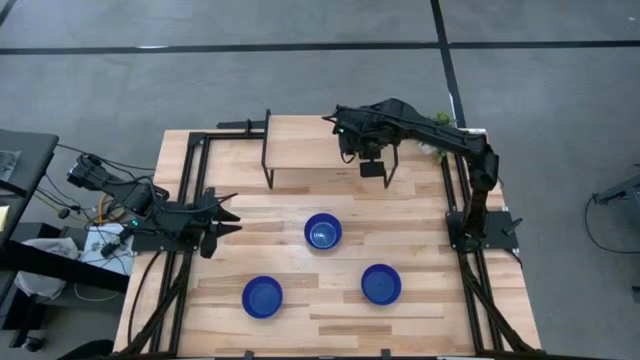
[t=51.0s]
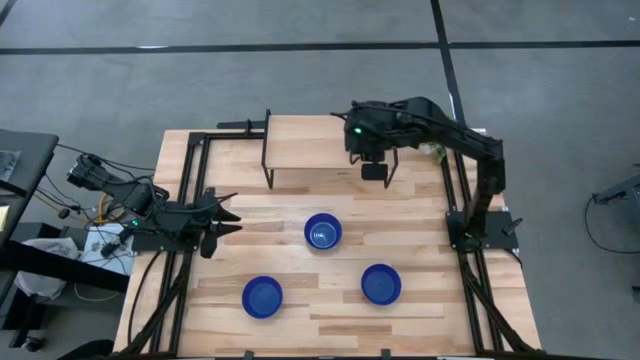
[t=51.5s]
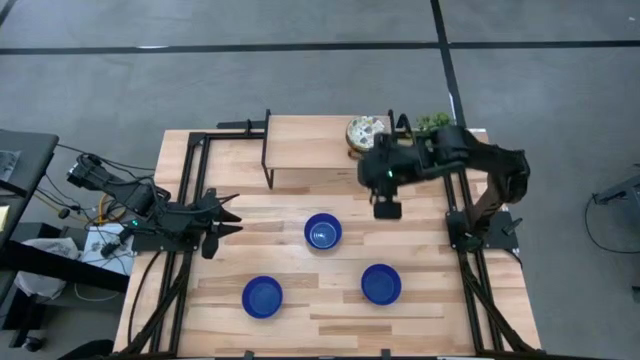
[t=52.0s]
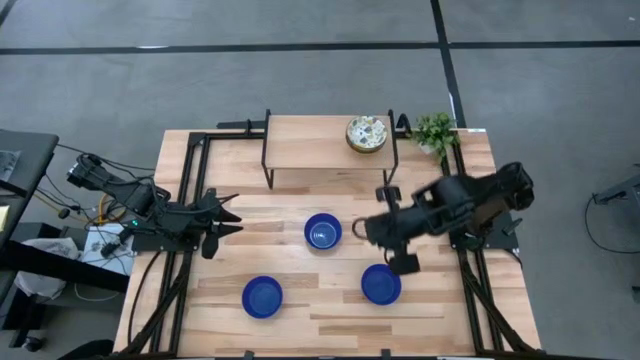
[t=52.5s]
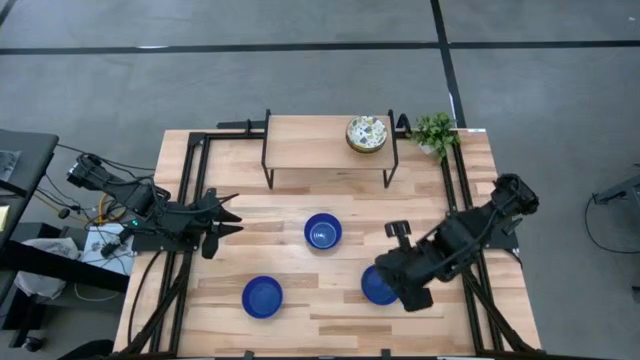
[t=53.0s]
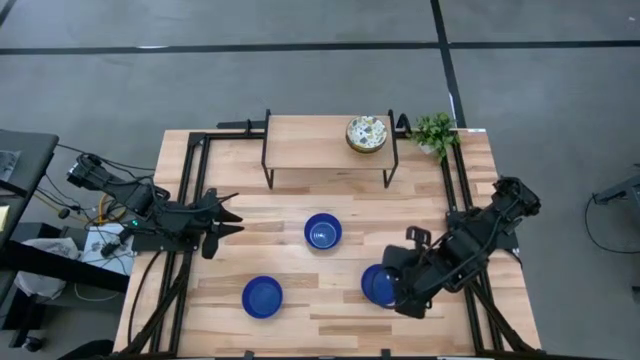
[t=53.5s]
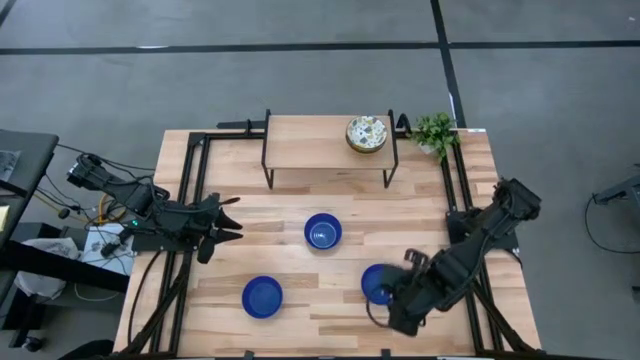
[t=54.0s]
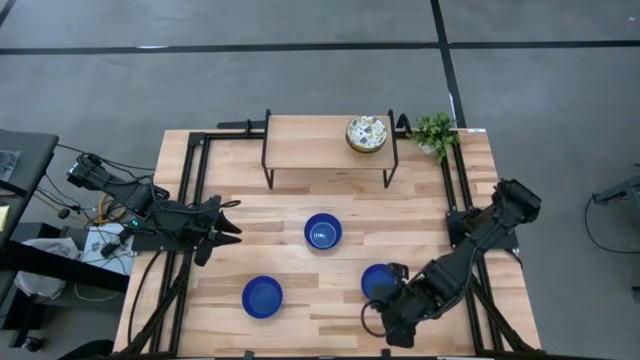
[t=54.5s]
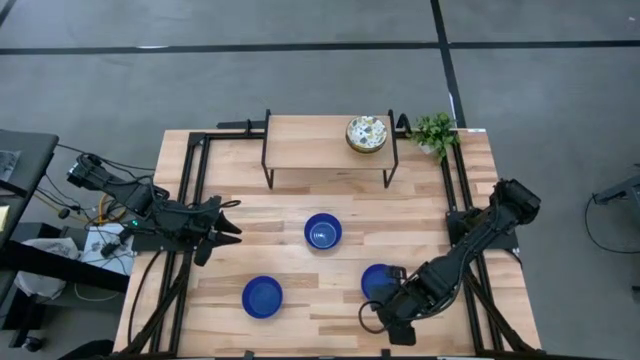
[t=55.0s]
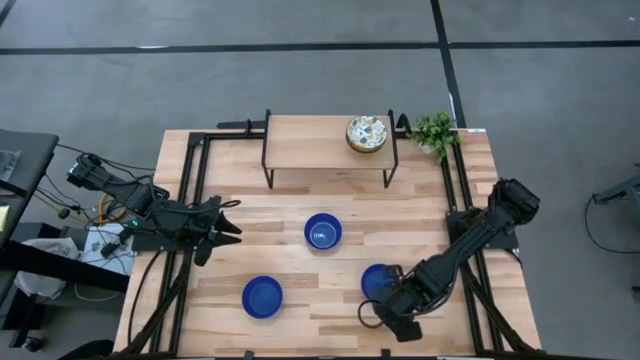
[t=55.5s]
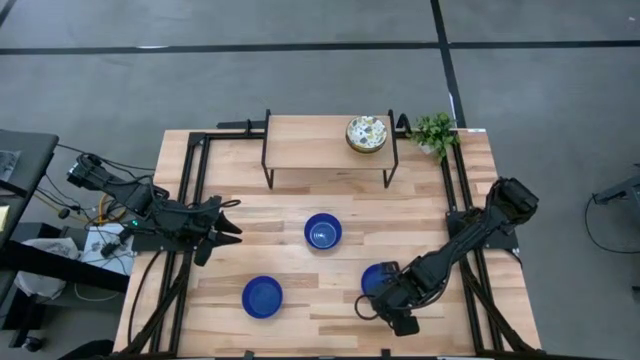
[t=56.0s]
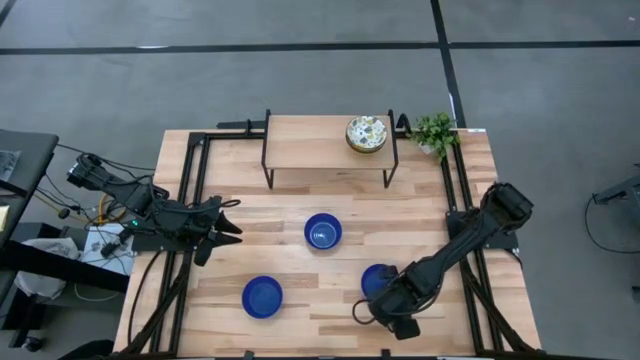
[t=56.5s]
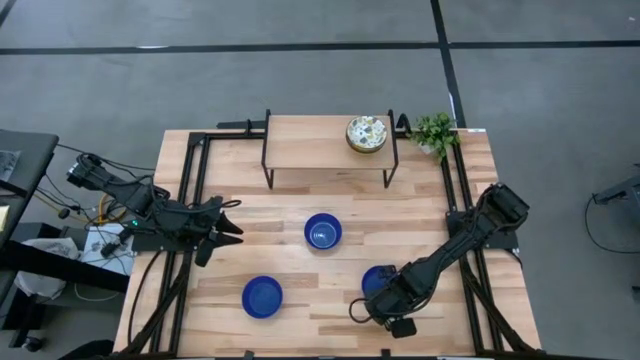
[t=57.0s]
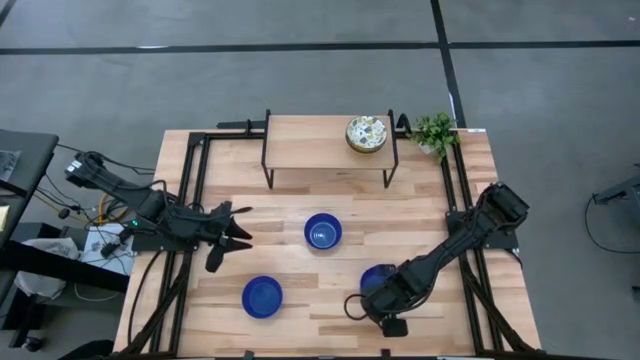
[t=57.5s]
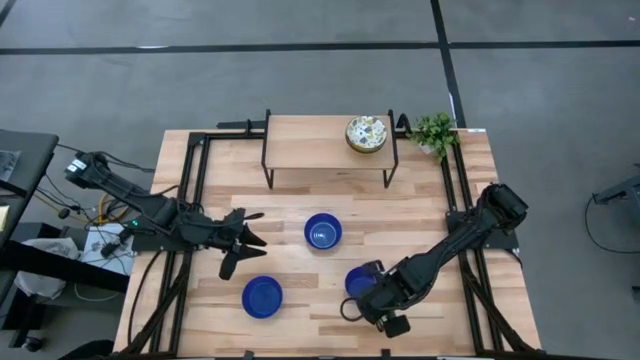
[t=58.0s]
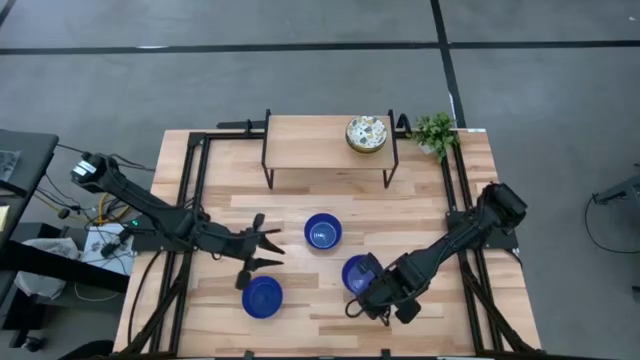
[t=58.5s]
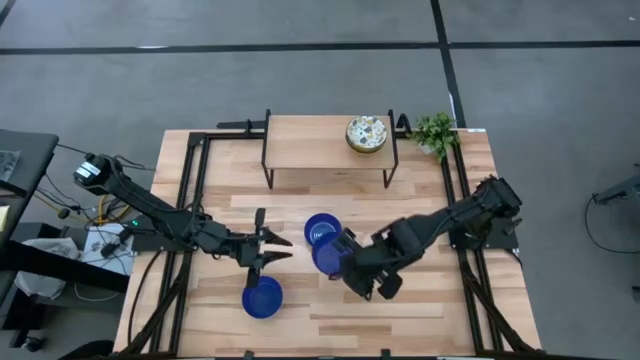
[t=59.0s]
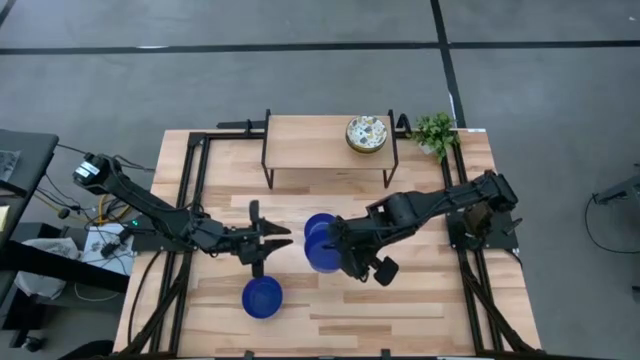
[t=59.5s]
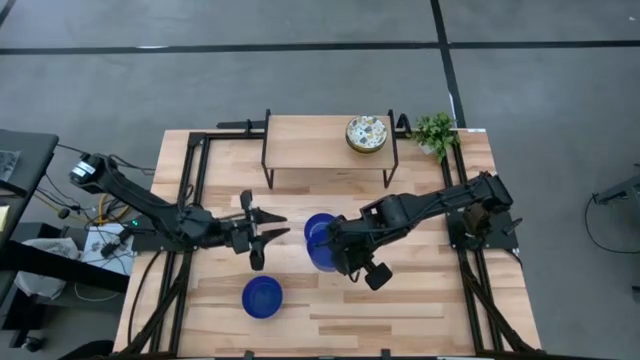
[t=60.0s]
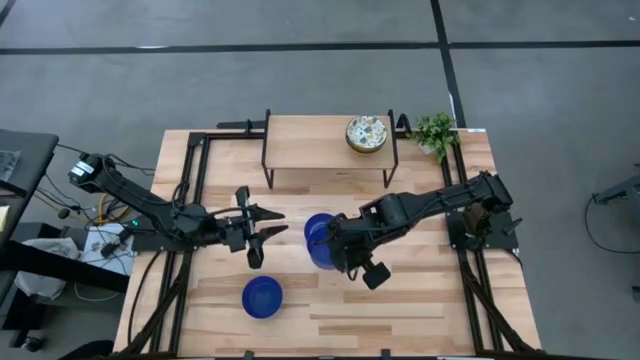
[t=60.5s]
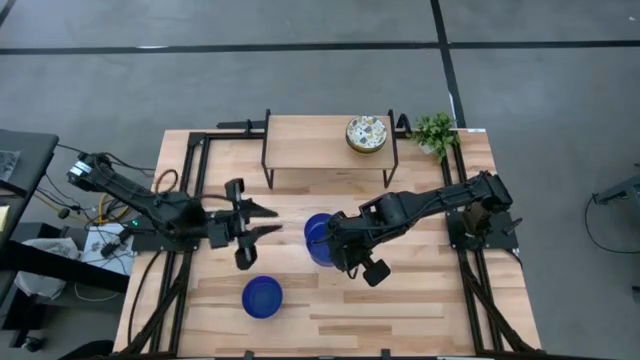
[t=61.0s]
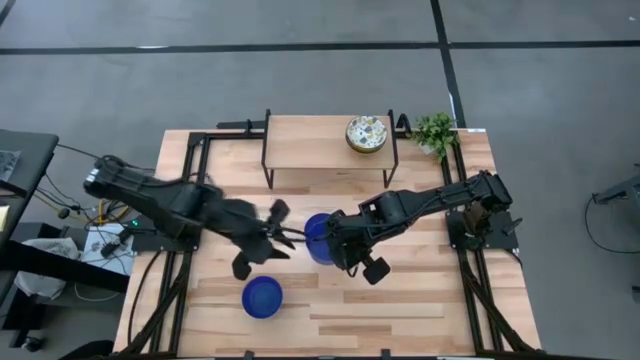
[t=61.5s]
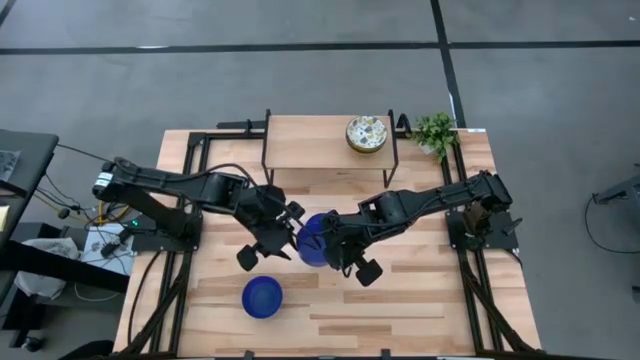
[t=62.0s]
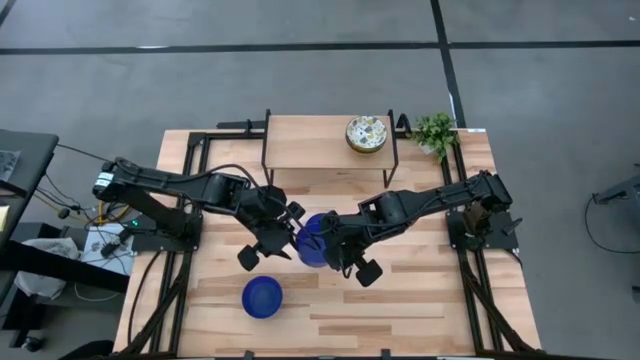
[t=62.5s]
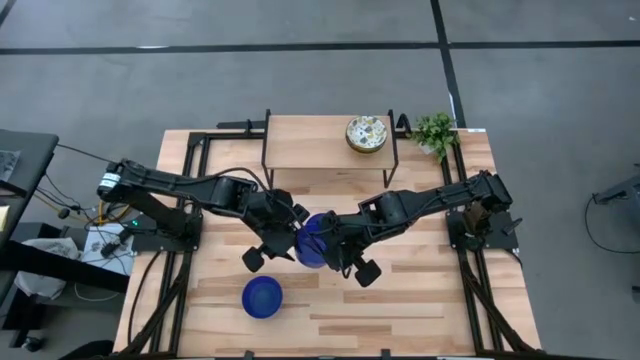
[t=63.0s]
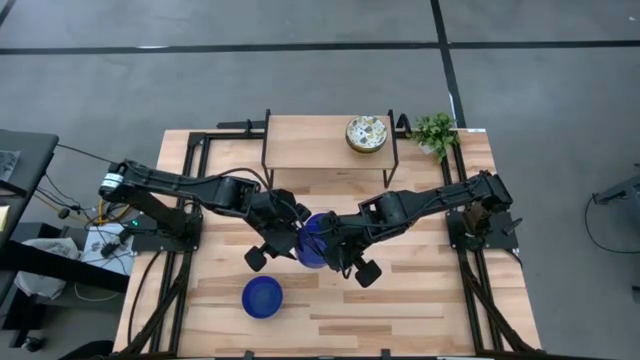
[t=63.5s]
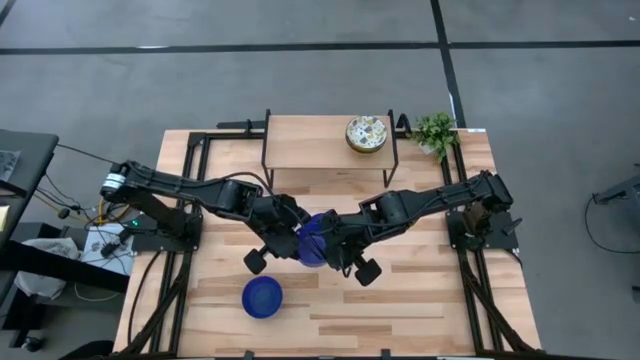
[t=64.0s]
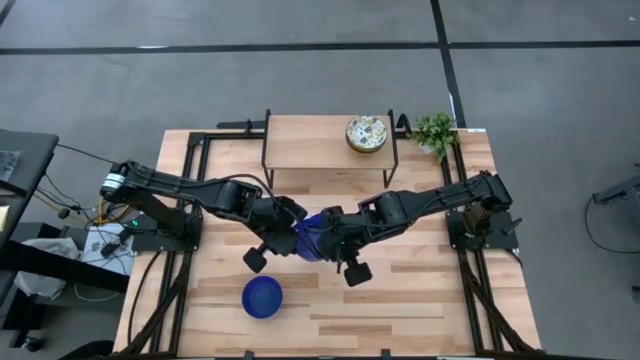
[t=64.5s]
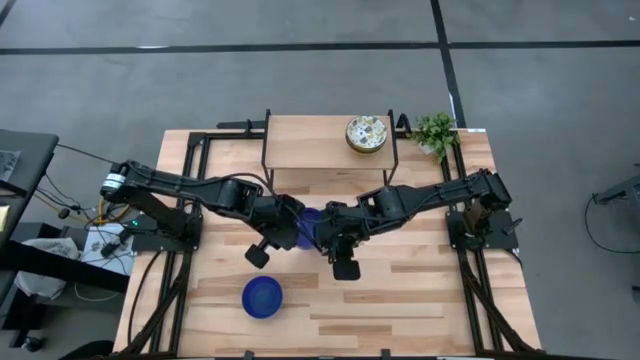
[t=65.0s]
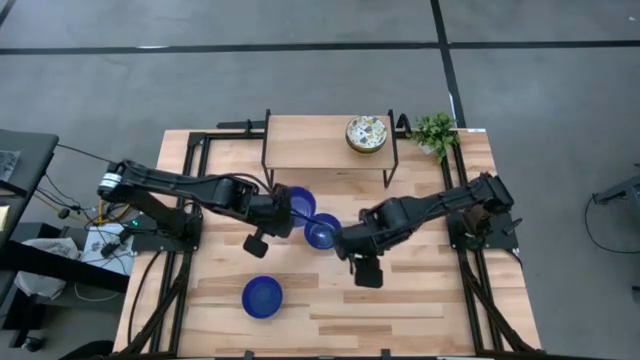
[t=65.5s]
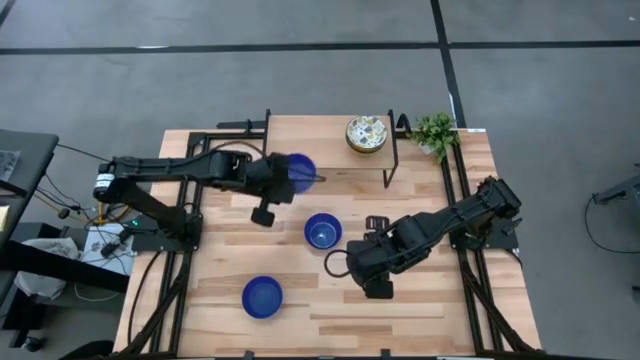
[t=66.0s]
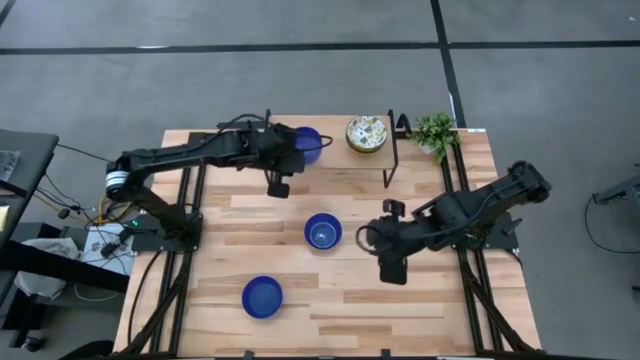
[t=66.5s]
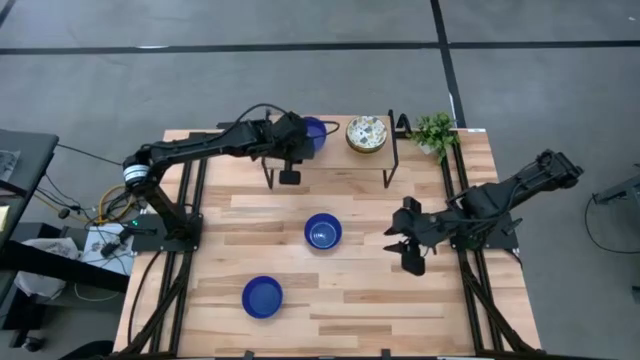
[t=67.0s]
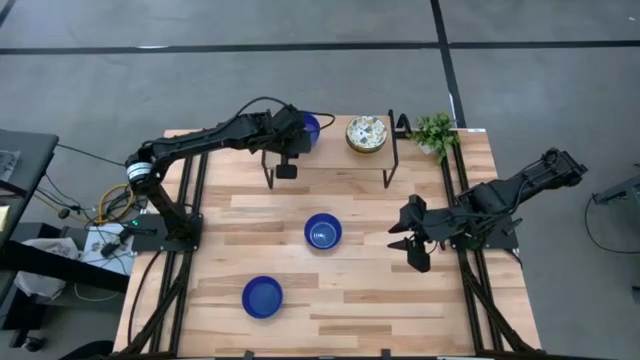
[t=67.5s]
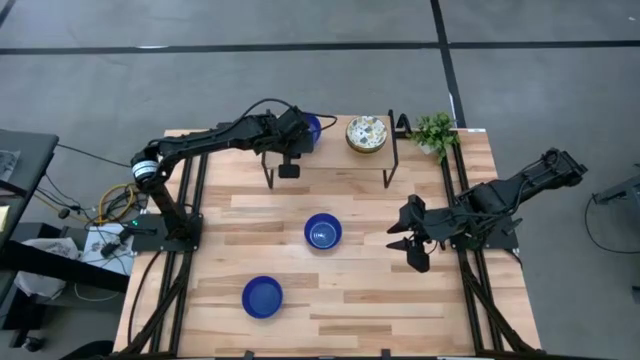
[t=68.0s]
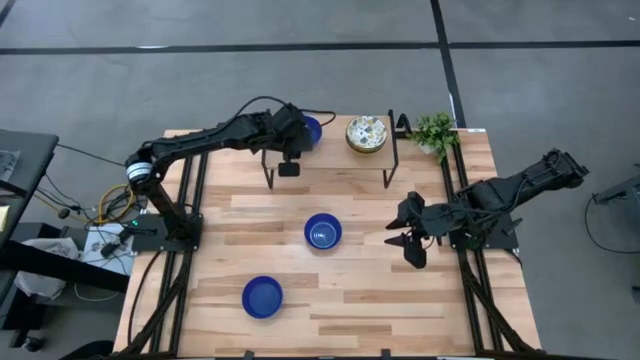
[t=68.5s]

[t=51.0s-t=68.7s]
Task: Pick & Place Mini bowls
Put the bottom right blue bowl on the shelf

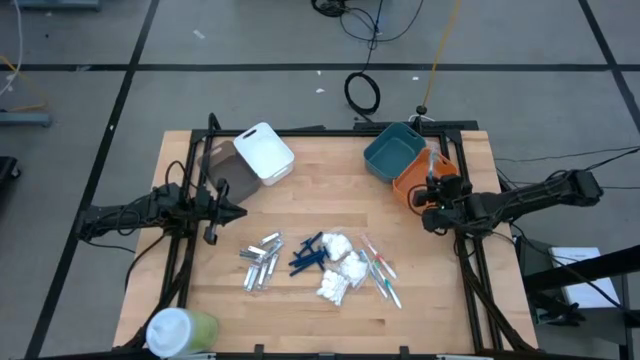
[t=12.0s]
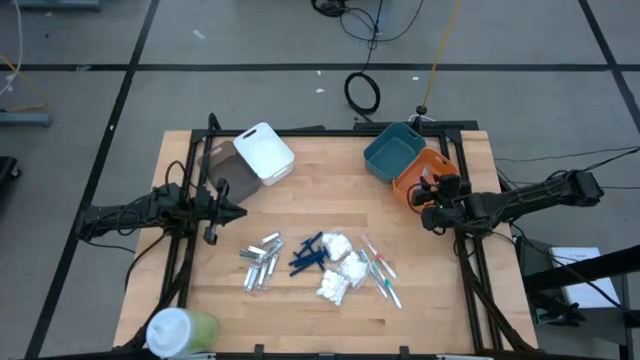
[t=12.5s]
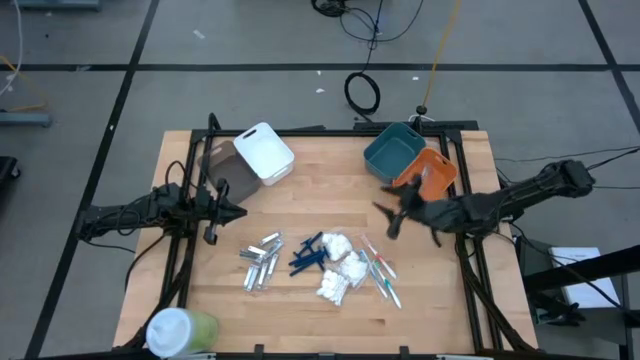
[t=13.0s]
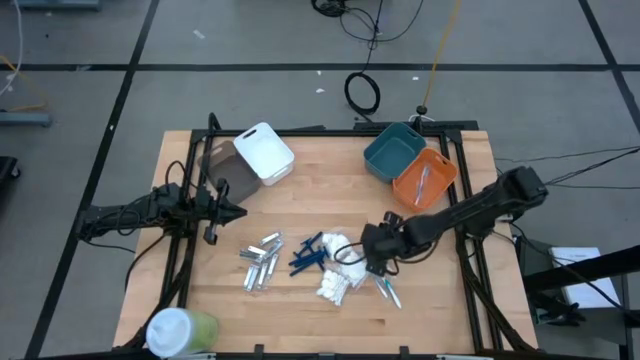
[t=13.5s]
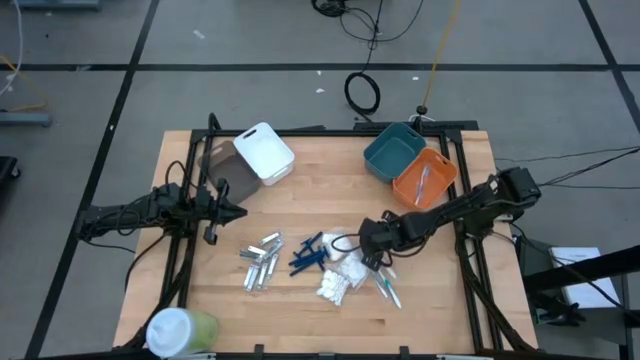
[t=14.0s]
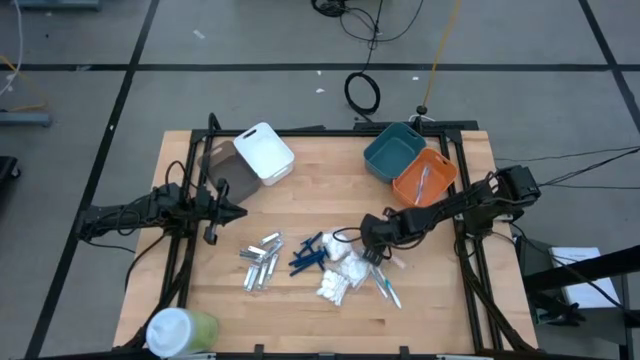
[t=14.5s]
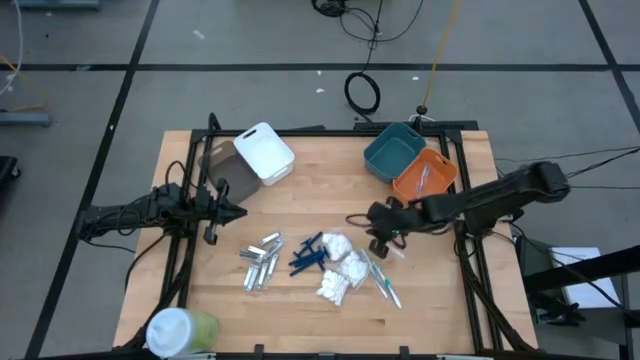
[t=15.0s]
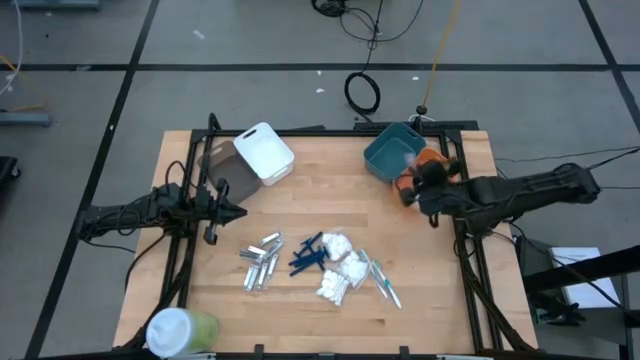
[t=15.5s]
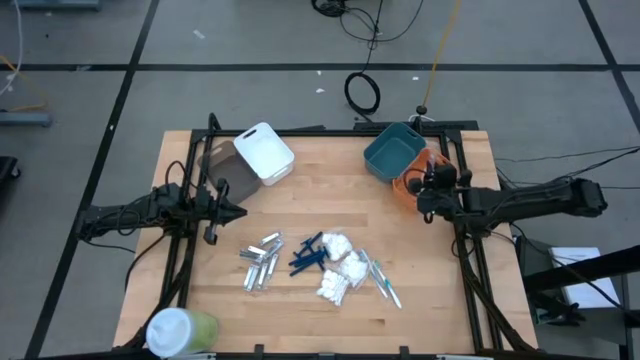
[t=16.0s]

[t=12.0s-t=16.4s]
Task: Pick & Place Travel size toiletries
Put the orange toothbrush into the orange bin
